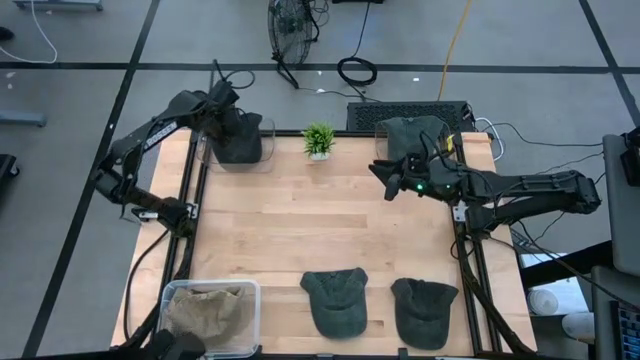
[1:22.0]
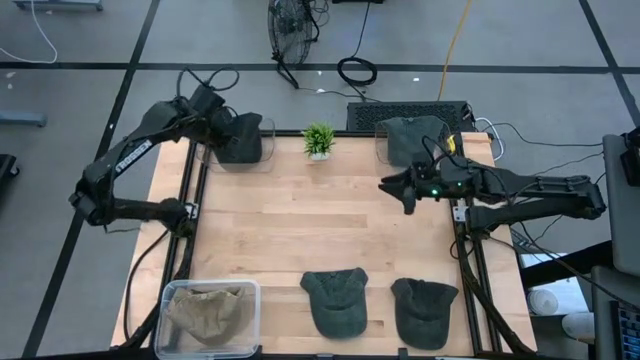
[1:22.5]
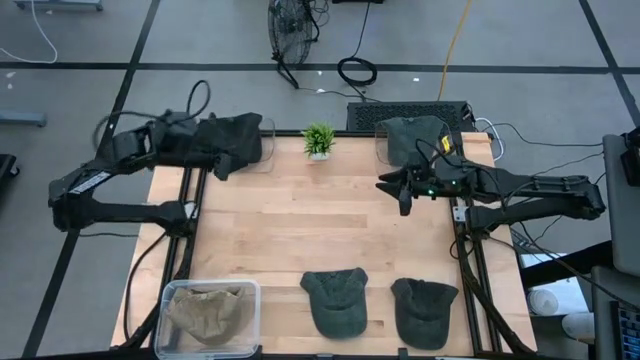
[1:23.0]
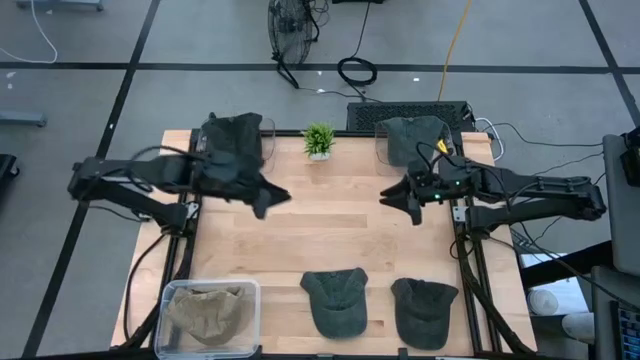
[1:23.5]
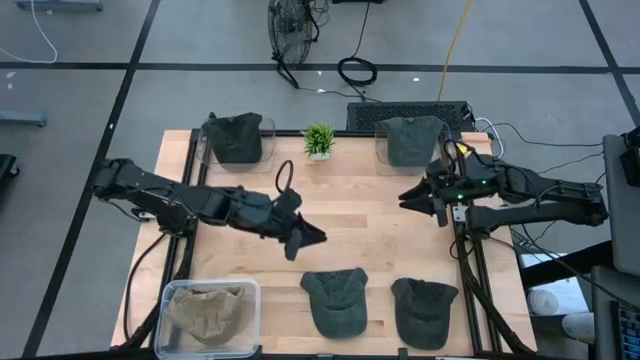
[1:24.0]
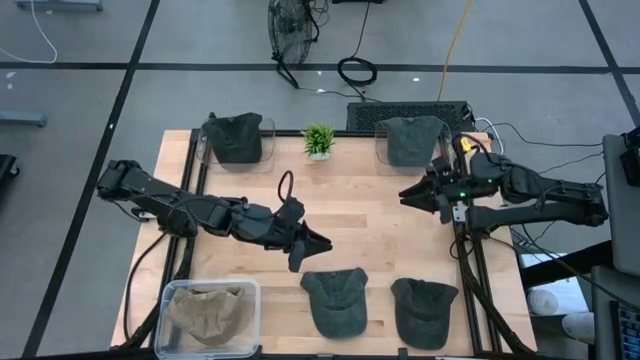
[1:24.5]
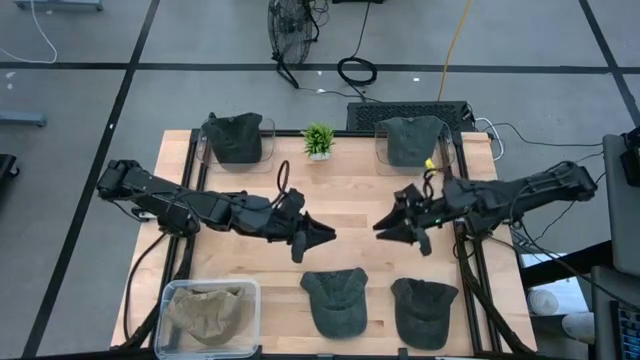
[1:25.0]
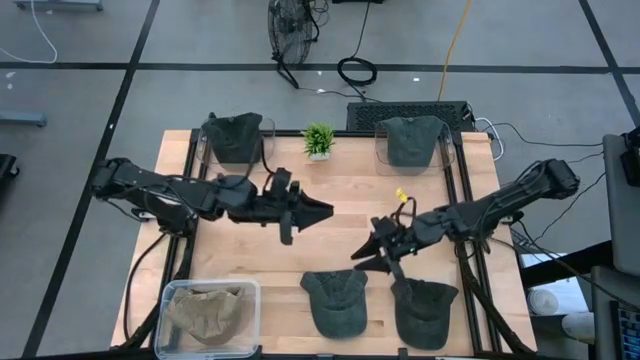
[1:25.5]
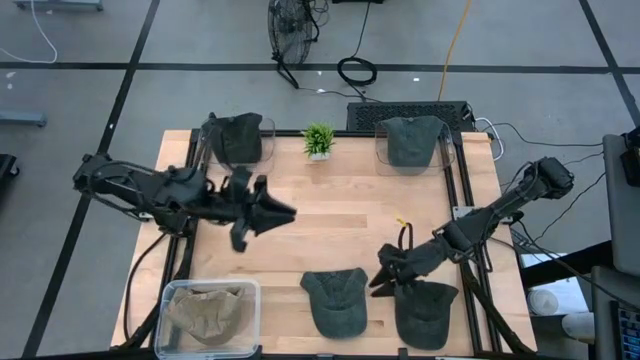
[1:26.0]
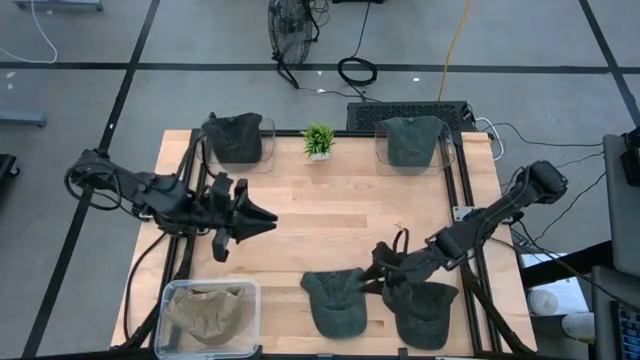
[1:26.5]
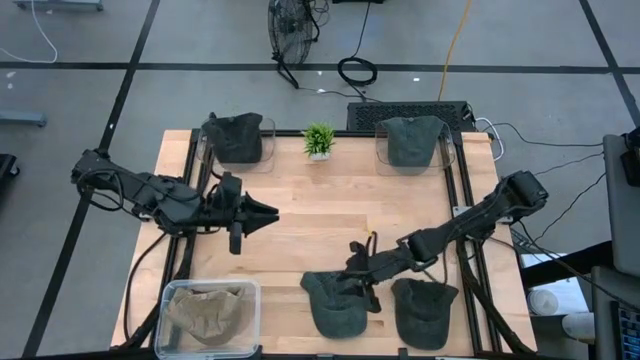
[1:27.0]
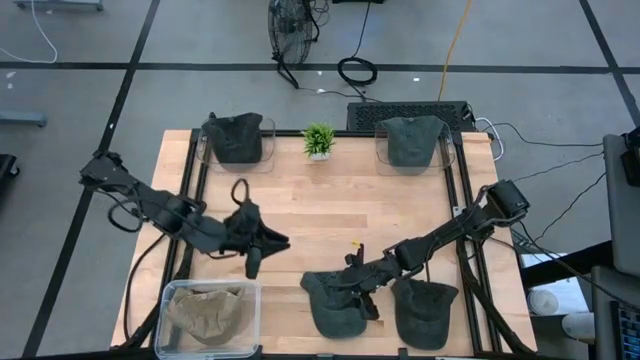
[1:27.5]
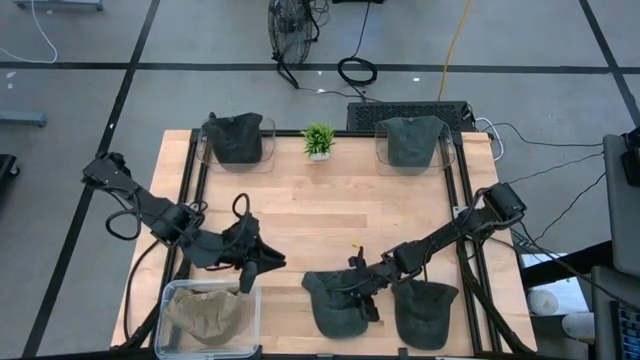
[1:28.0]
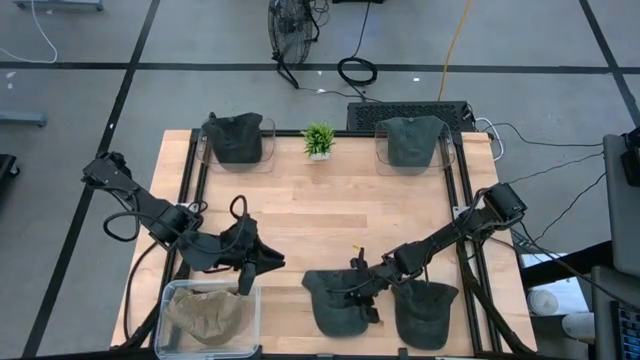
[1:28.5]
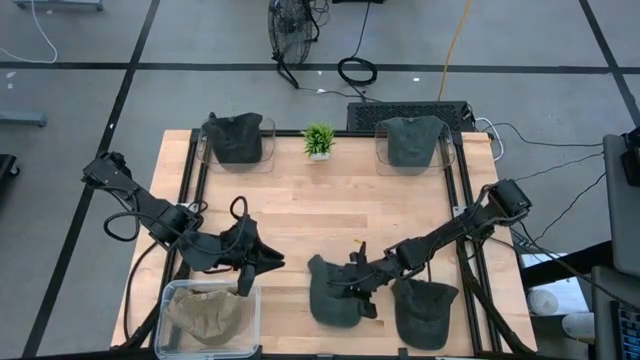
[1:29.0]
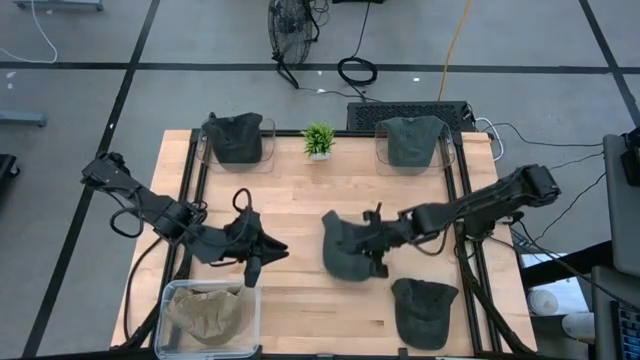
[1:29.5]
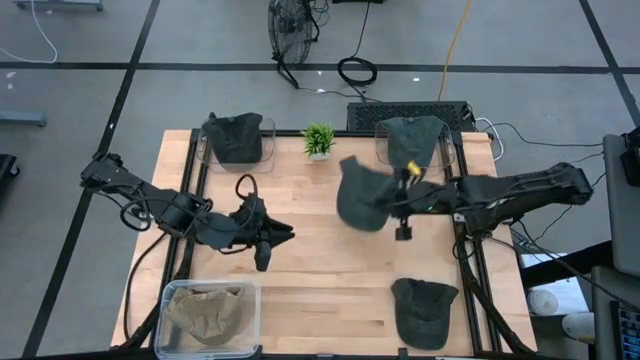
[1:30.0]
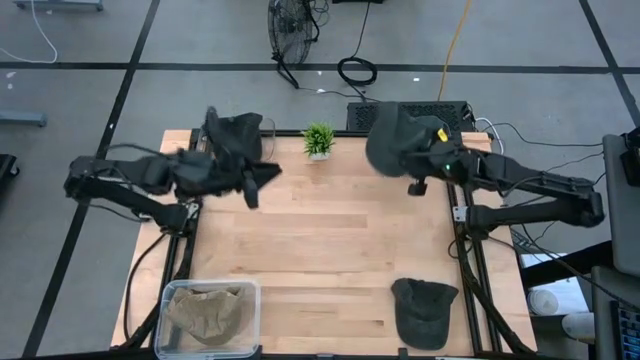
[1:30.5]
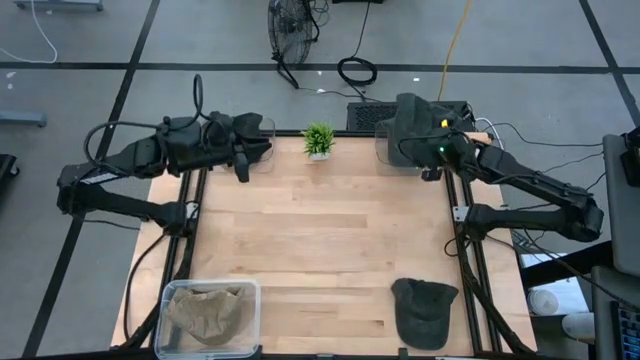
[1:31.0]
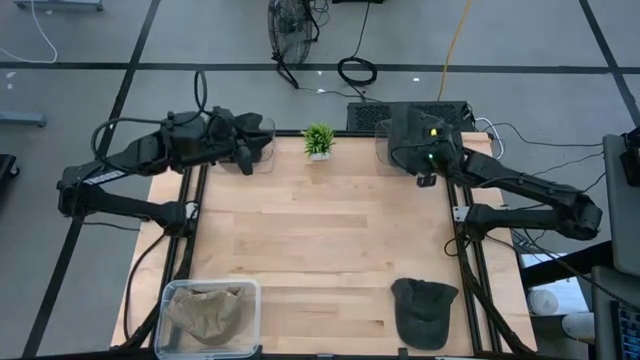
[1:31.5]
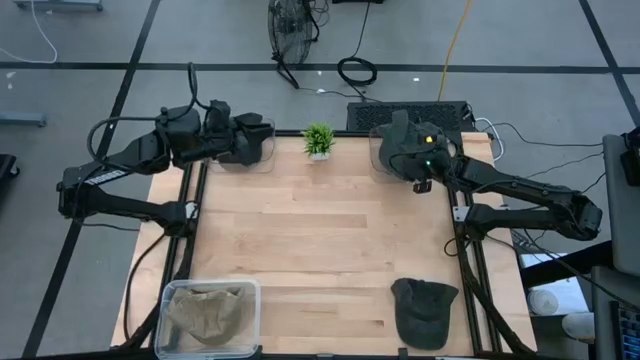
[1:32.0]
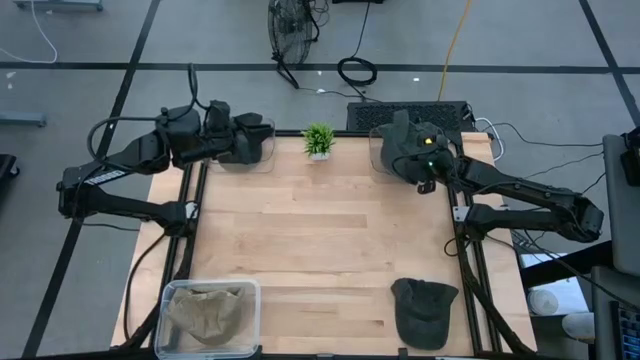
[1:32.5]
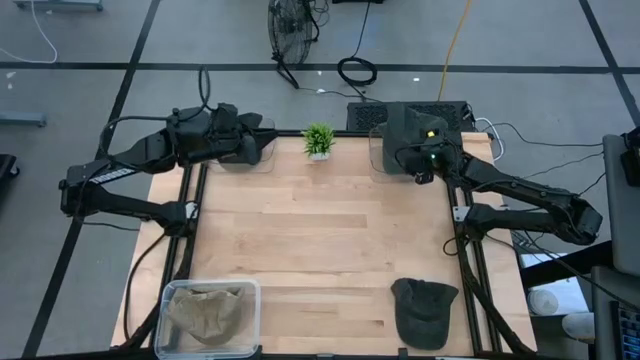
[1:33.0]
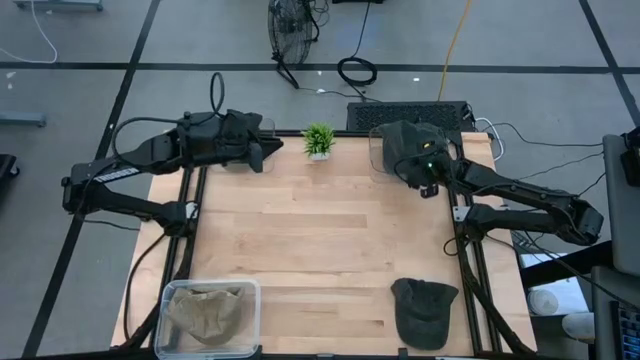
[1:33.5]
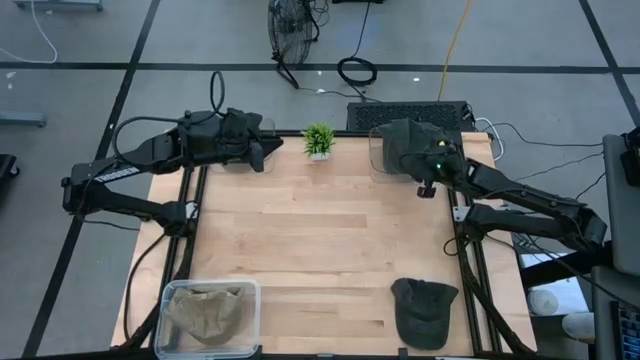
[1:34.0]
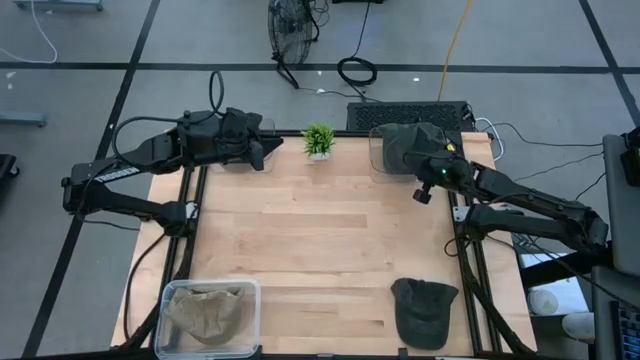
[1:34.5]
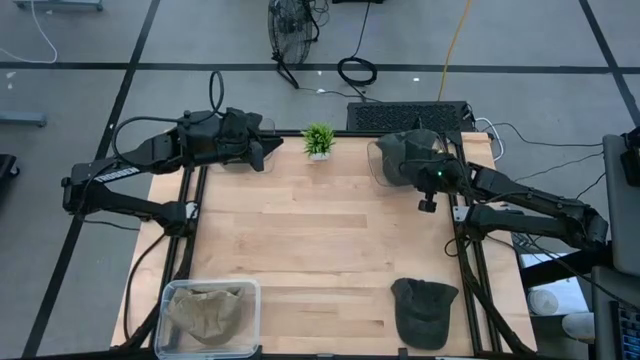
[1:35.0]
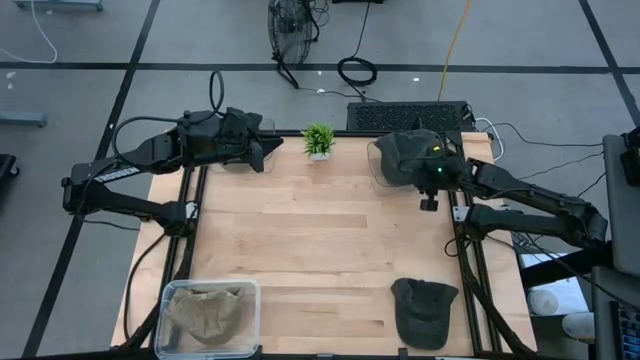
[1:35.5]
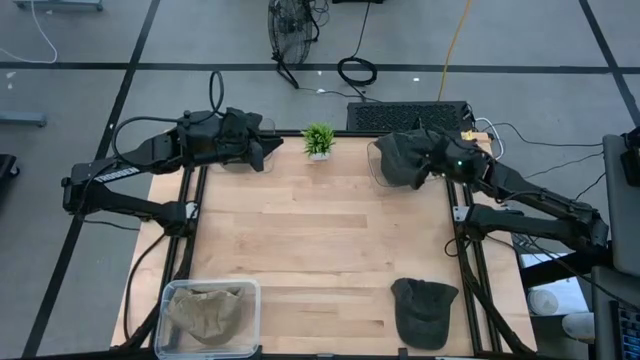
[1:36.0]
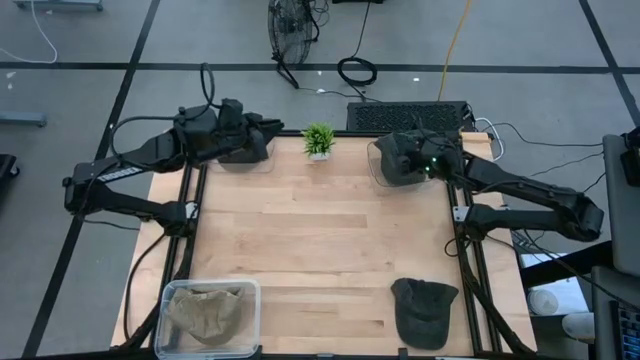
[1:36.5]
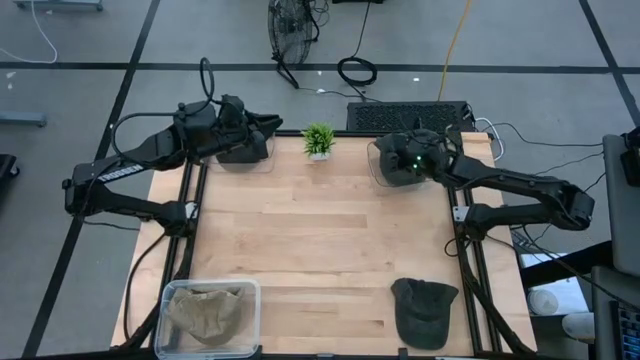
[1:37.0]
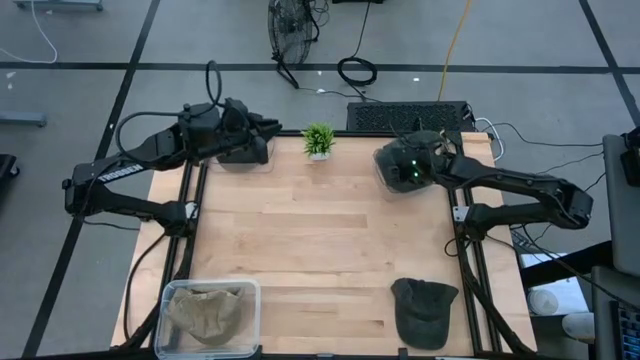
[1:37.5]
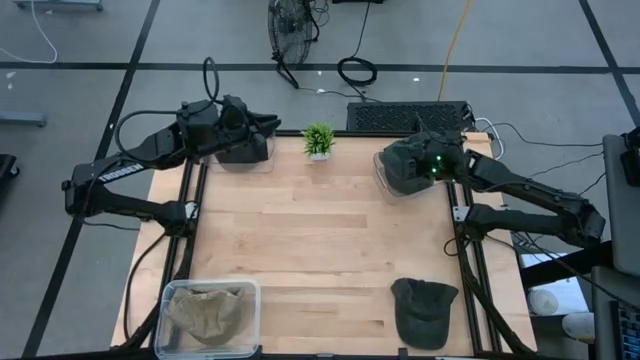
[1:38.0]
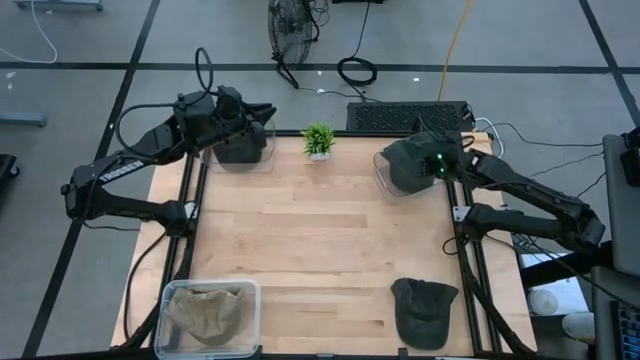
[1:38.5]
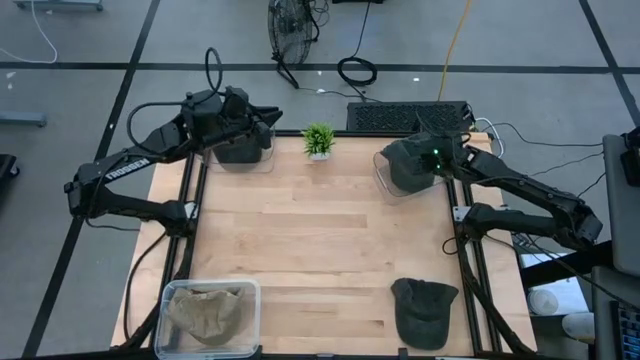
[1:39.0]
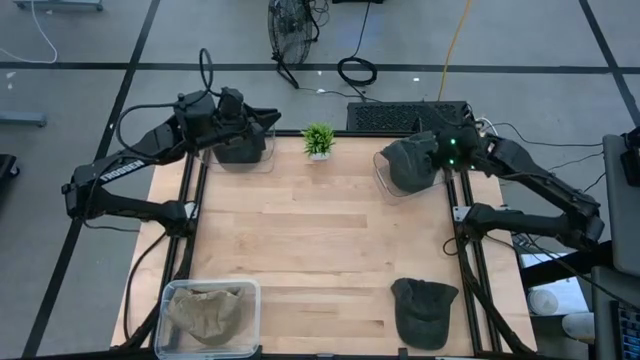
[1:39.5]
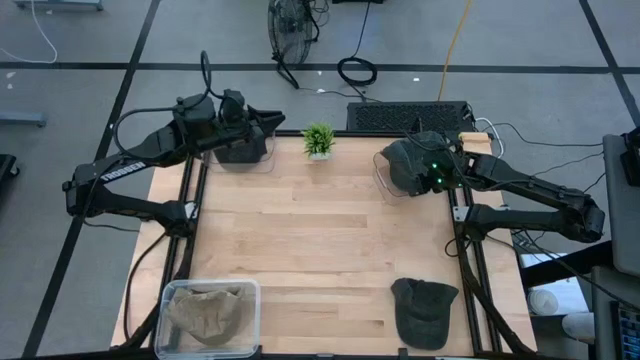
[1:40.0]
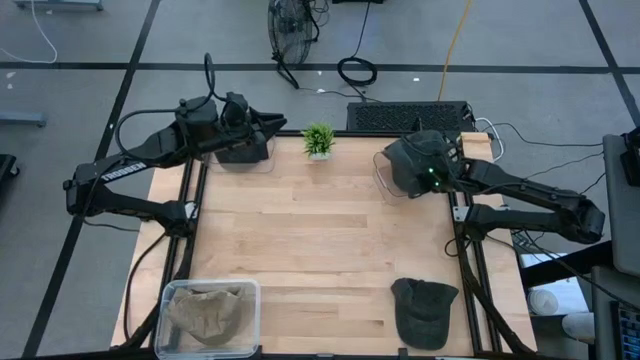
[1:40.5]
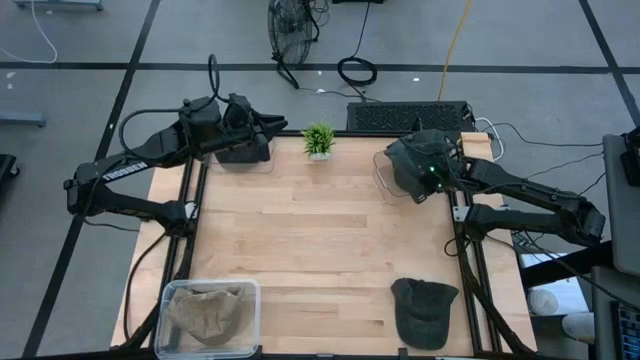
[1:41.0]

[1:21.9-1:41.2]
Task: Pick & Place hat
Put the green cap into the right transparent bin

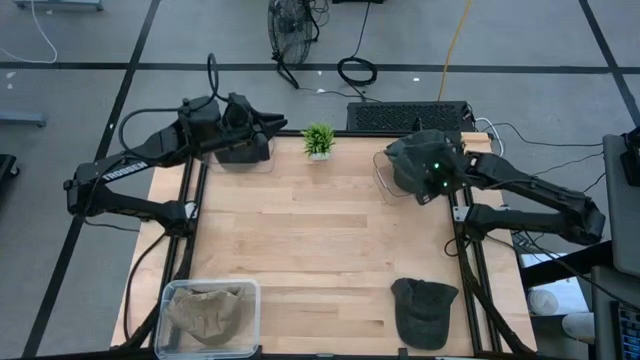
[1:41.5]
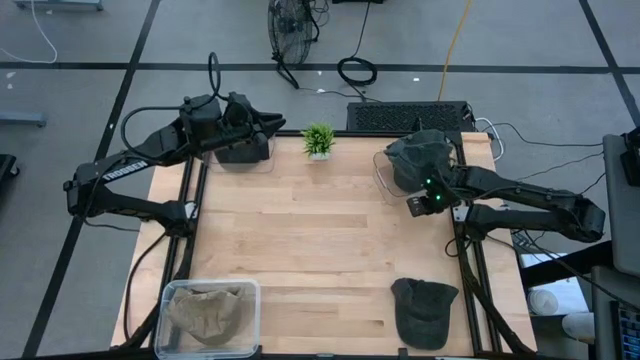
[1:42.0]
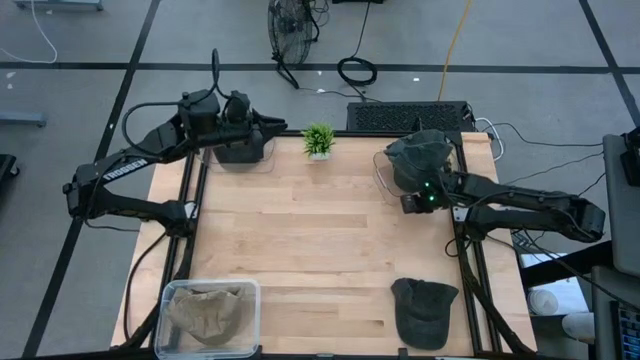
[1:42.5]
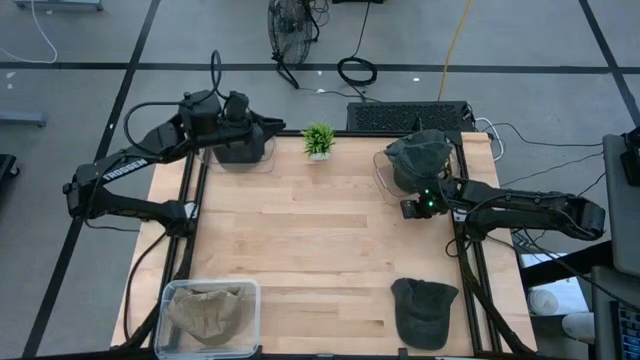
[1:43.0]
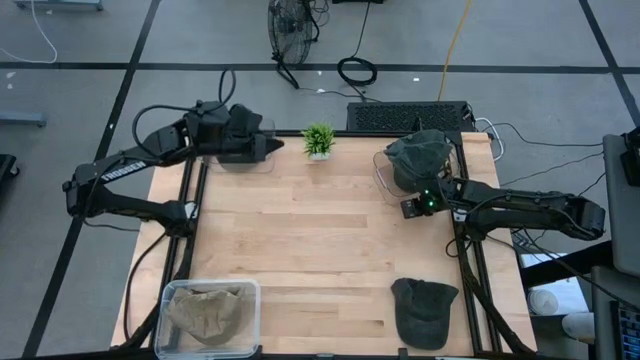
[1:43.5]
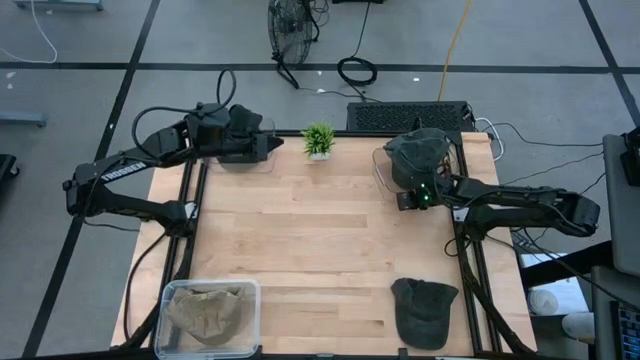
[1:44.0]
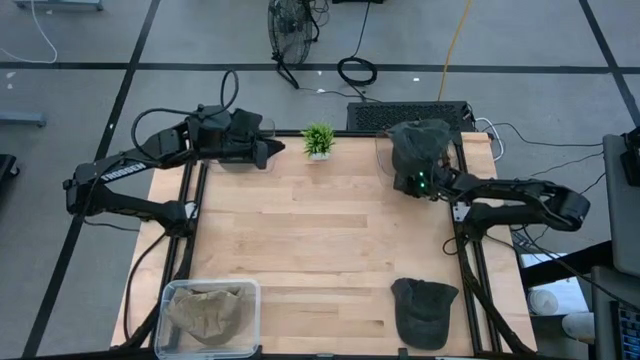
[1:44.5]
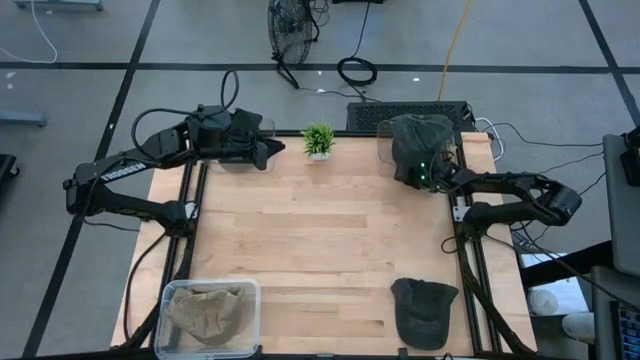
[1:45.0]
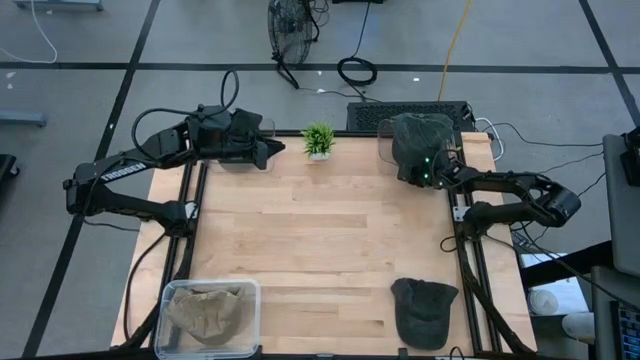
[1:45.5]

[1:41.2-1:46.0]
Adjust the right transparent bin
